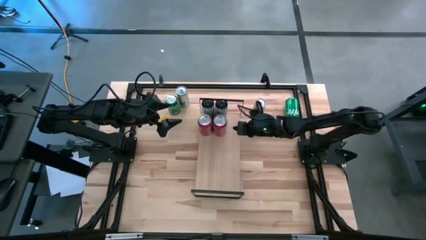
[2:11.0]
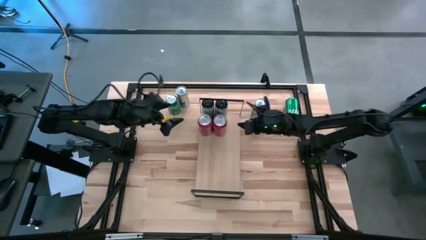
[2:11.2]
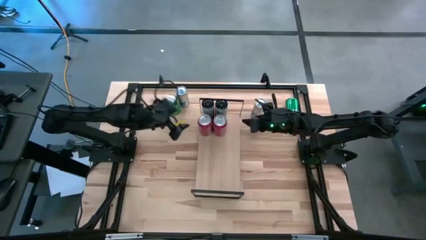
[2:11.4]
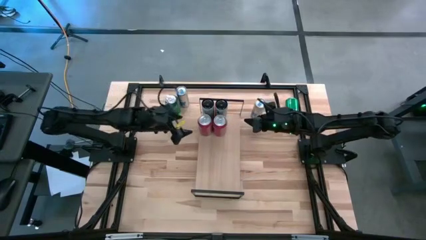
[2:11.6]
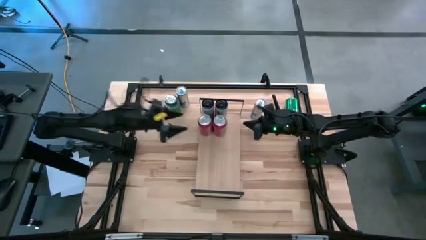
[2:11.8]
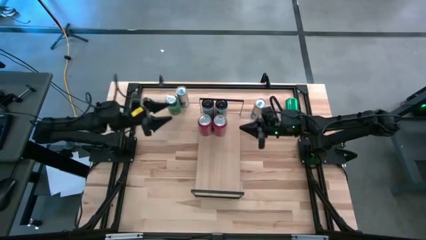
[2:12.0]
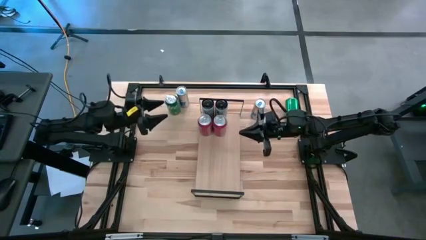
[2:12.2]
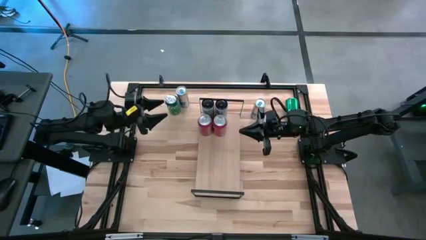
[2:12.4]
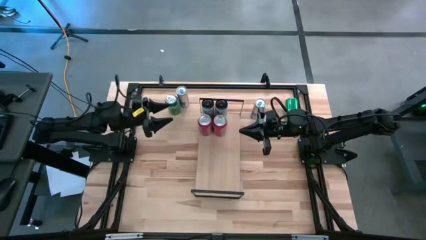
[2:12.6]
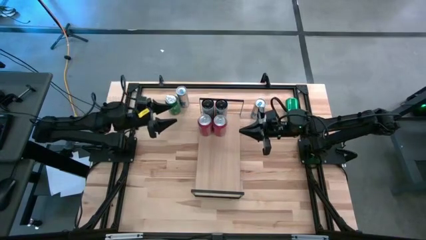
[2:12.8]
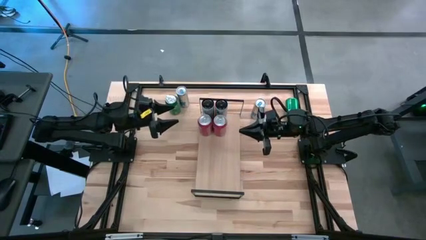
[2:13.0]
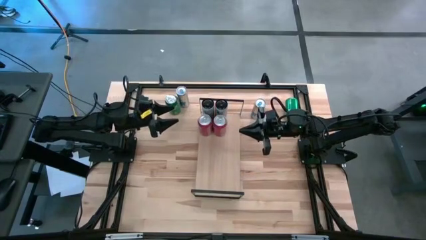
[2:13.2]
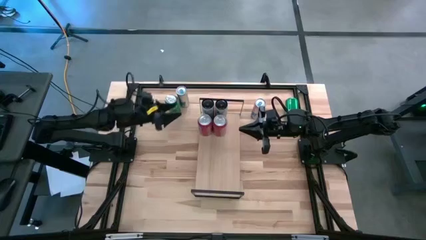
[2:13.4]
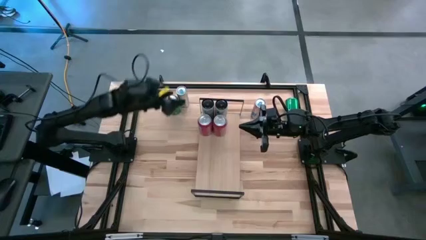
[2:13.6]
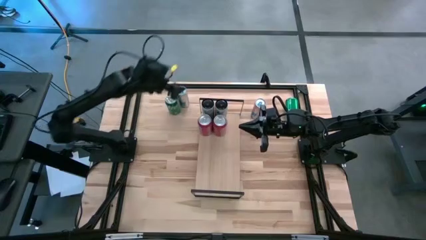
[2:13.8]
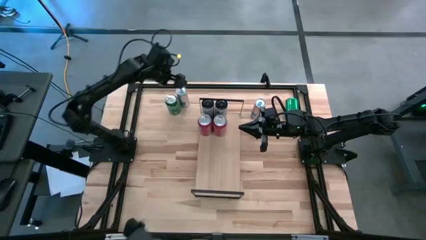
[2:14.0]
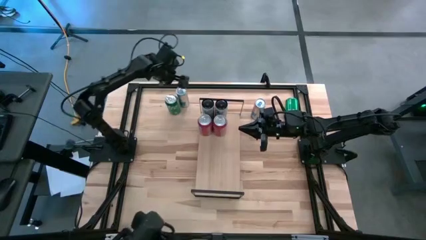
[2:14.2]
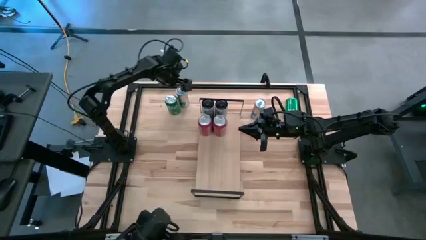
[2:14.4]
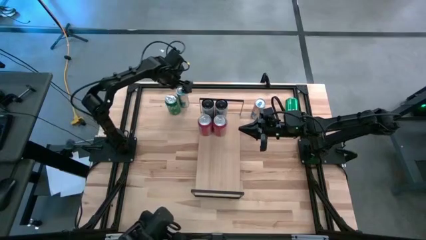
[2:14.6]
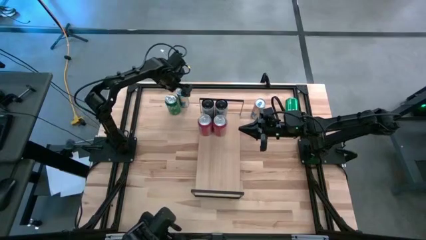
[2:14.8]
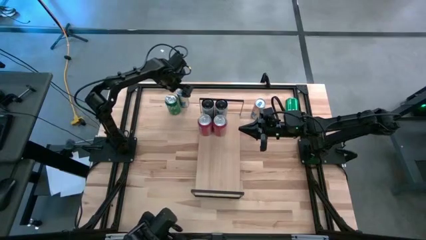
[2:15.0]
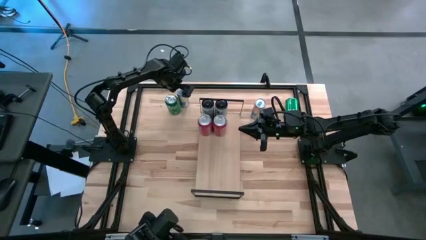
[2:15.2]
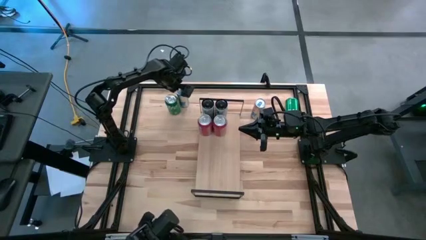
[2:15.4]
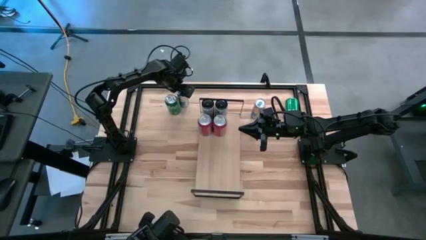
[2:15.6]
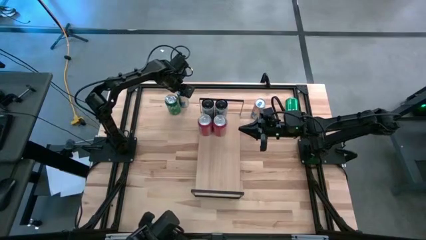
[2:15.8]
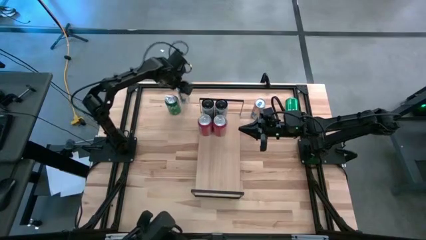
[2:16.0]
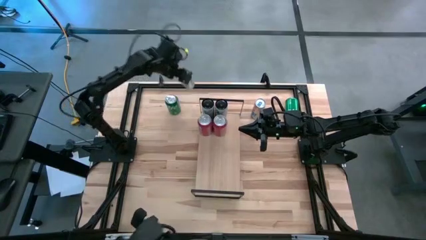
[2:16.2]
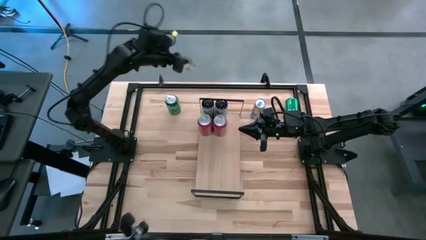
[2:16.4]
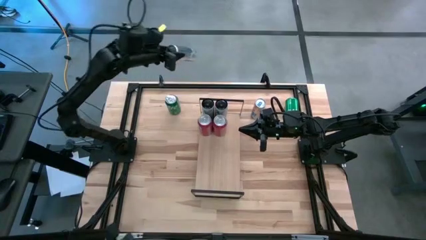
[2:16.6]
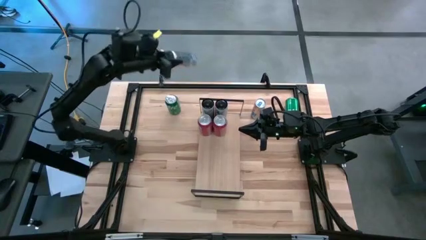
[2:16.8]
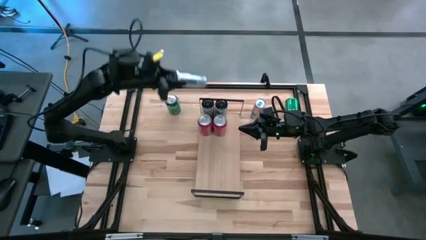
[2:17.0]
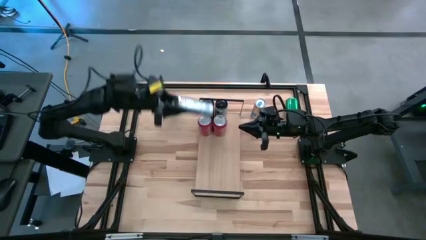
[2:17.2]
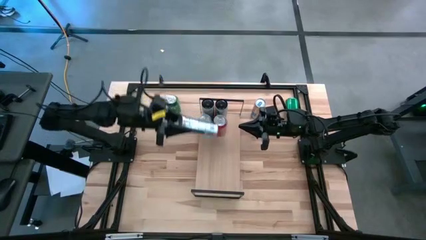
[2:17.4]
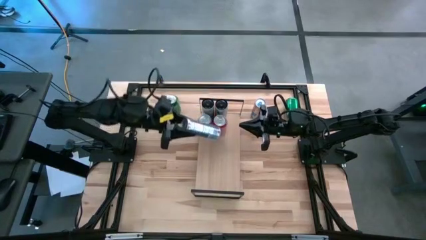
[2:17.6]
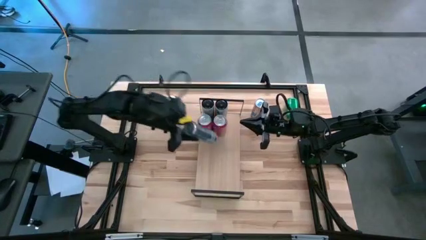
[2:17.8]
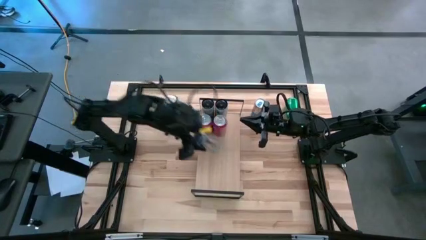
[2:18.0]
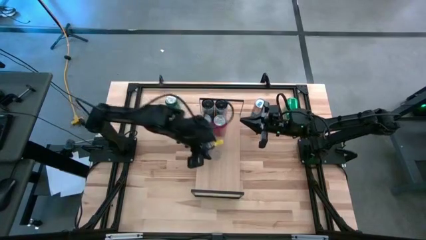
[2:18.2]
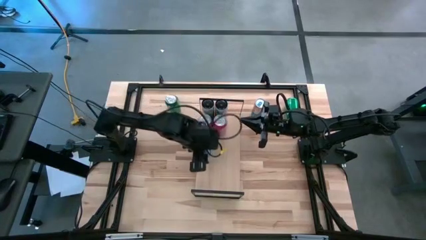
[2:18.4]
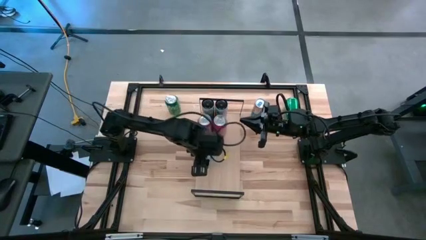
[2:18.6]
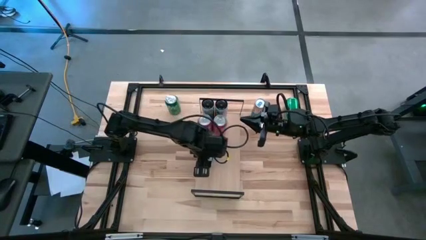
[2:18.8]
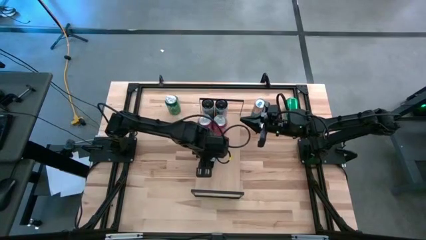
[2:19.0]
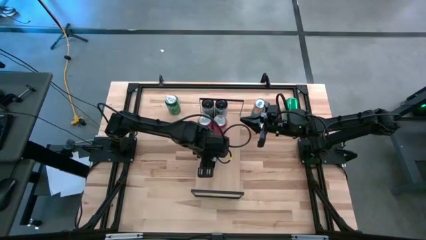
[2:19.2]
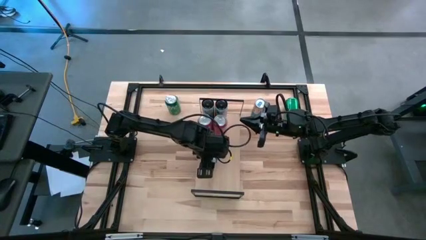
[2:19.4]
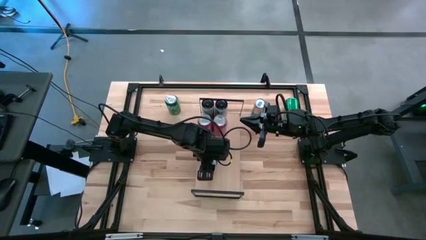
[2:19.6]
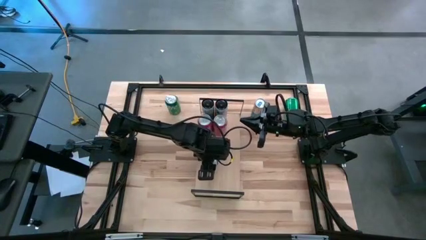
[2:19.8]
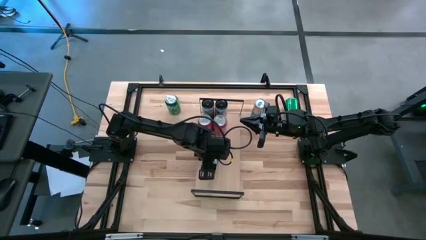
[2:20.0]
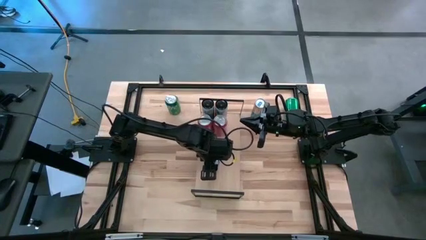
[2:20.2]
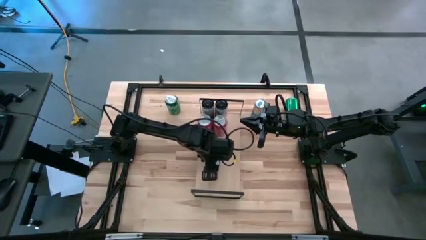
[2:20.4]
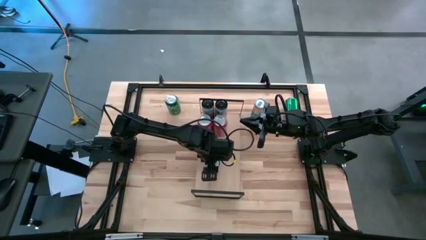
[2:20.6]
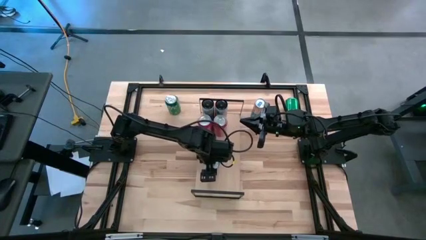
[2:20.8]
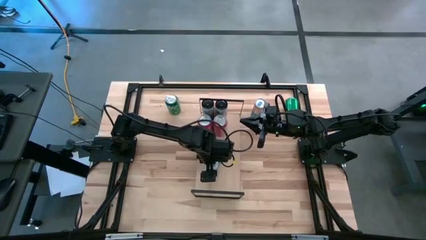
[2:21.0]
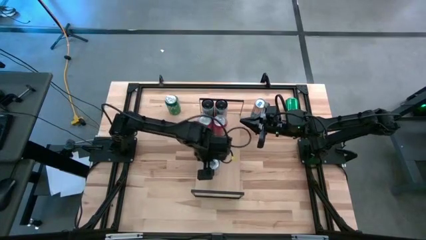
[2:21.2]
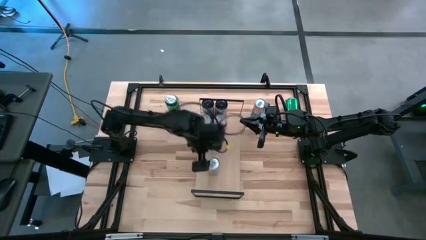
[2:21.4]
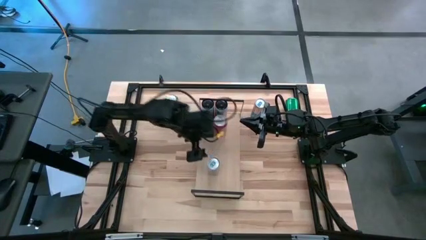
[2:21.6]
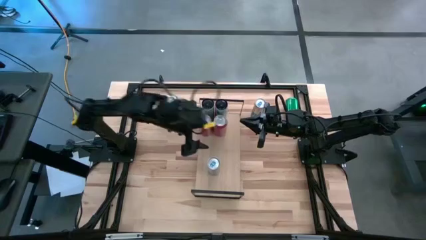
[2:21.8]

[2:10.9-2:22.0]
Task: Place canned beverage on shelf
Put the left blue soda can on the shelf
